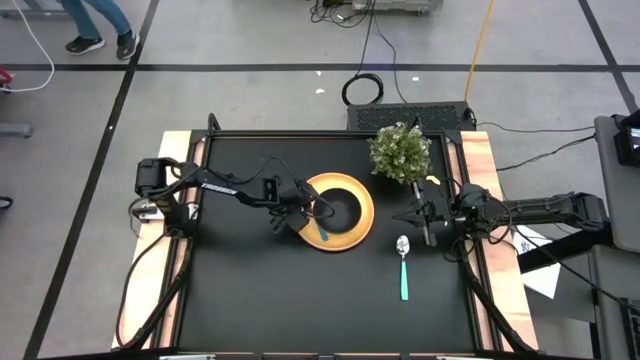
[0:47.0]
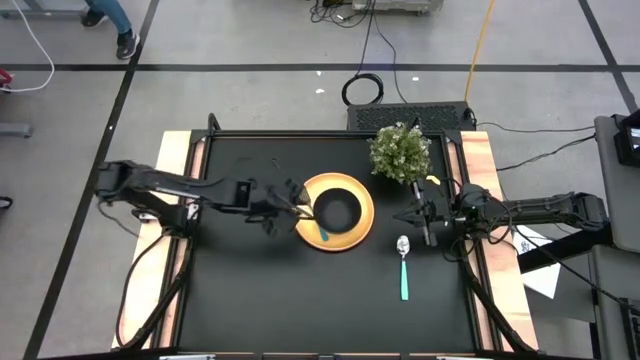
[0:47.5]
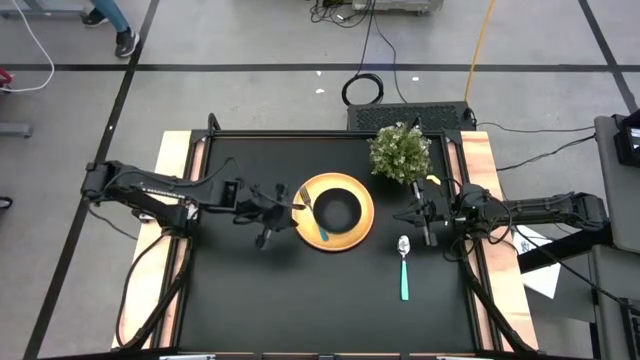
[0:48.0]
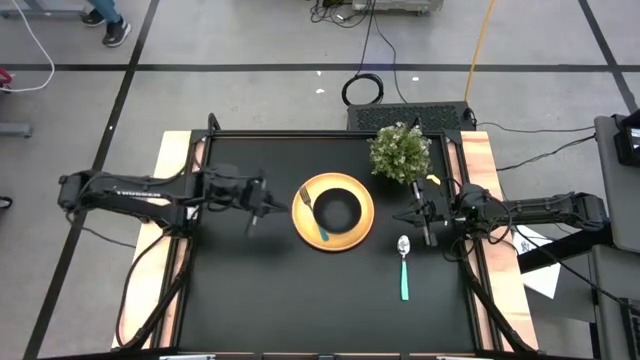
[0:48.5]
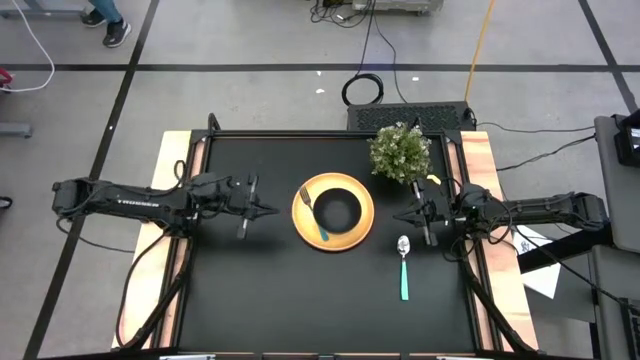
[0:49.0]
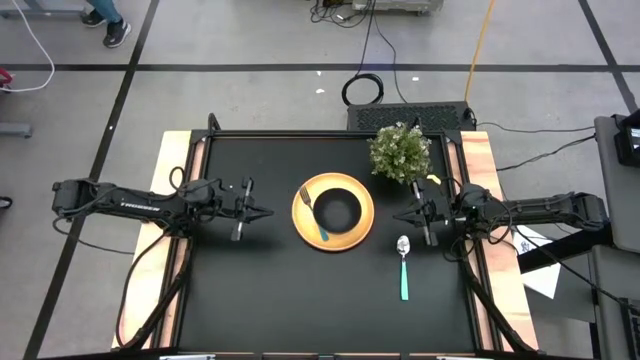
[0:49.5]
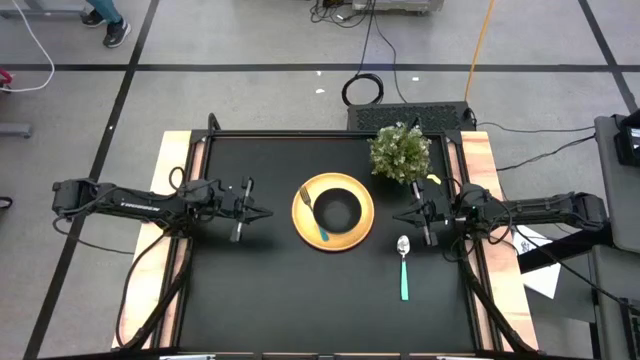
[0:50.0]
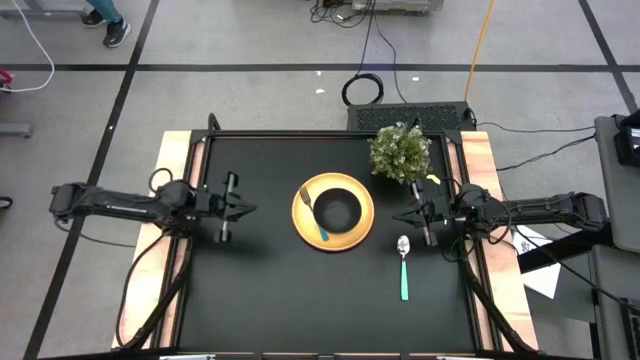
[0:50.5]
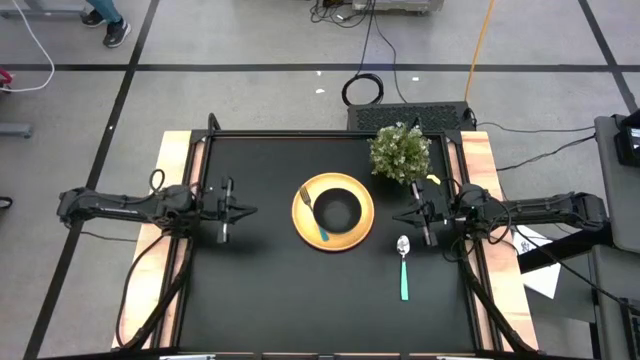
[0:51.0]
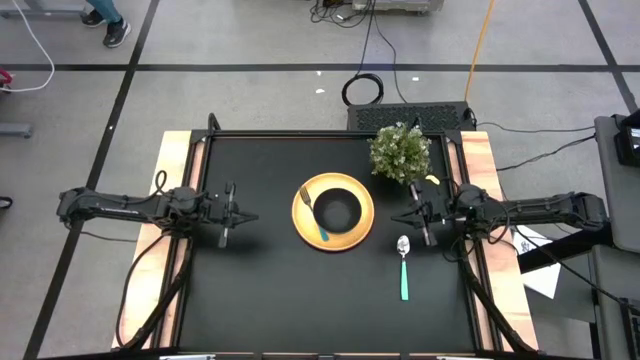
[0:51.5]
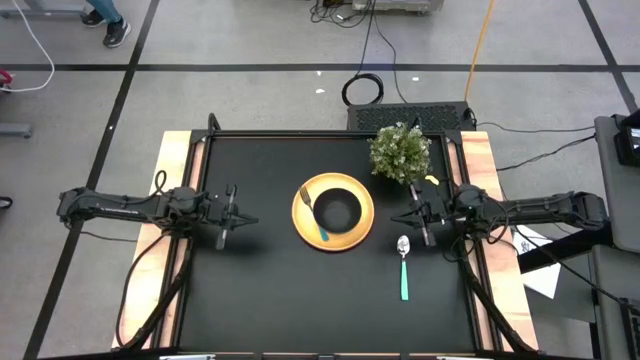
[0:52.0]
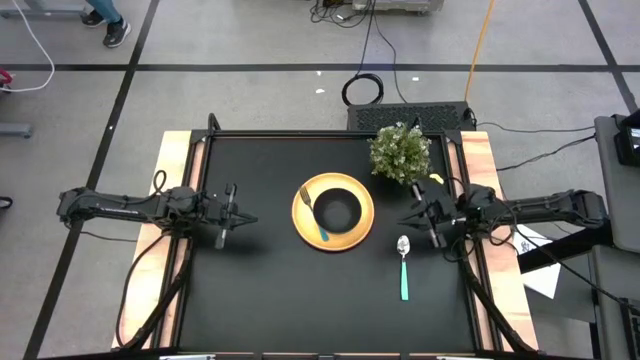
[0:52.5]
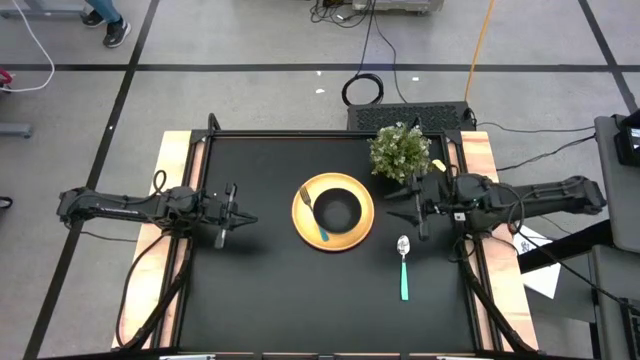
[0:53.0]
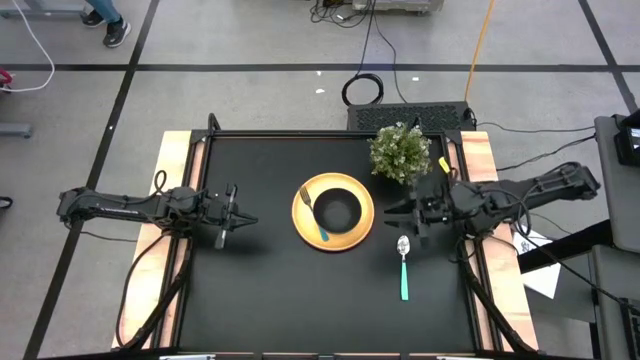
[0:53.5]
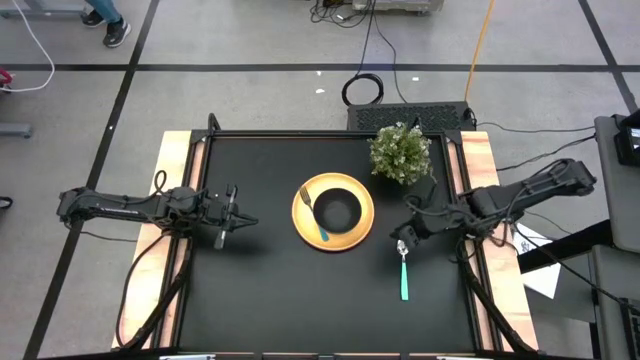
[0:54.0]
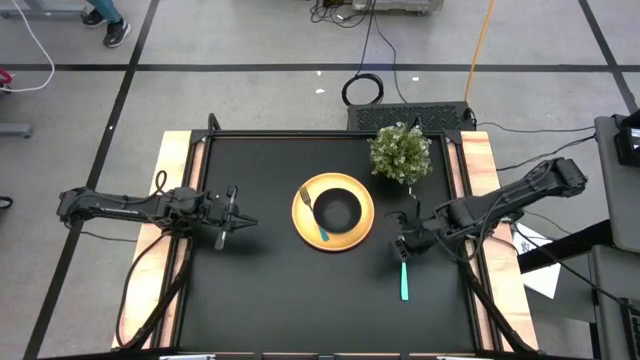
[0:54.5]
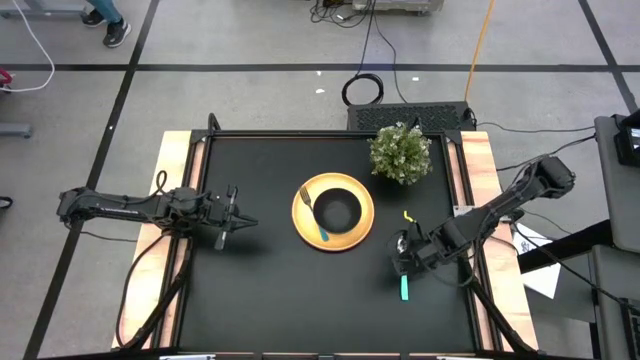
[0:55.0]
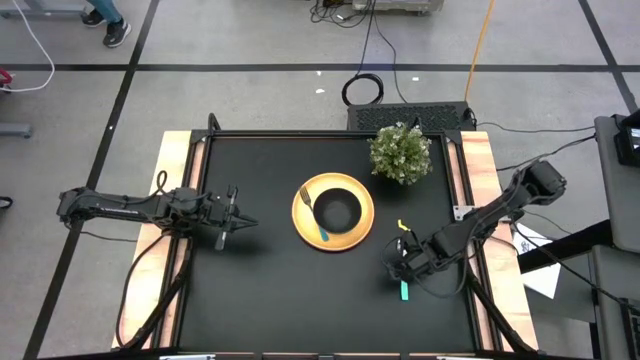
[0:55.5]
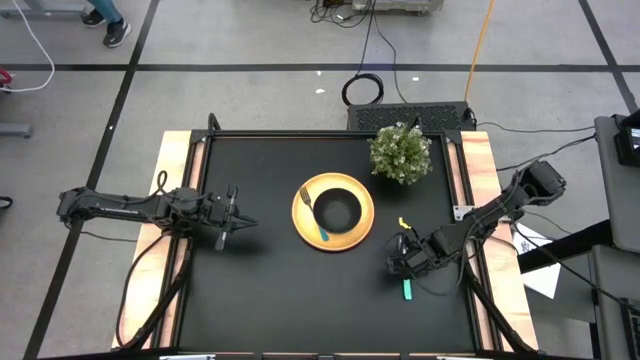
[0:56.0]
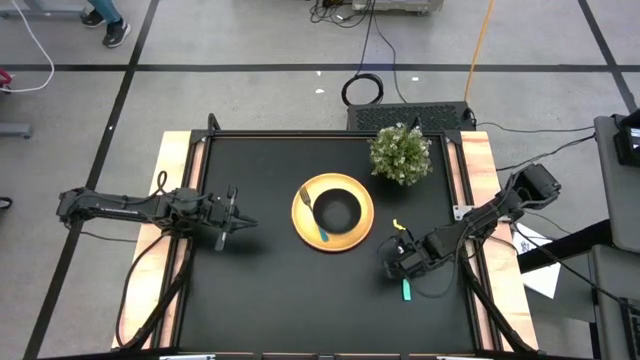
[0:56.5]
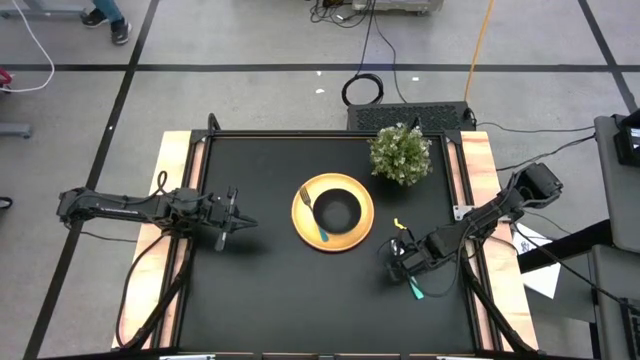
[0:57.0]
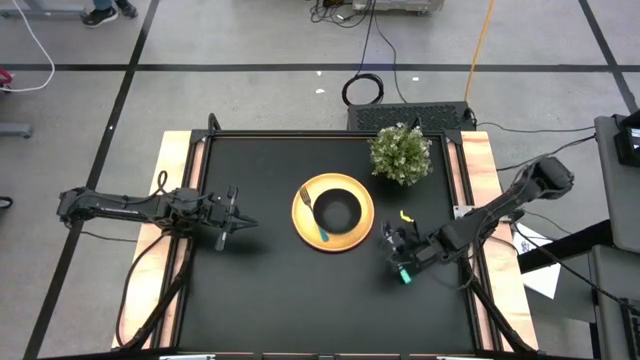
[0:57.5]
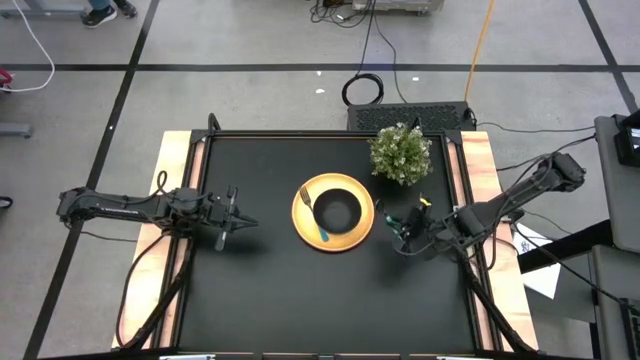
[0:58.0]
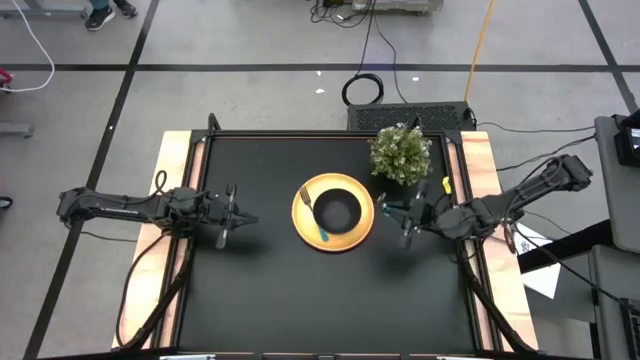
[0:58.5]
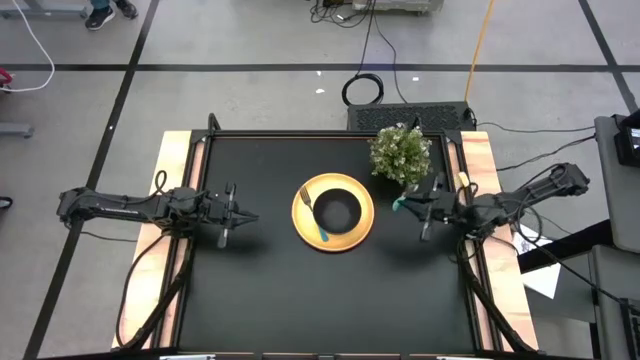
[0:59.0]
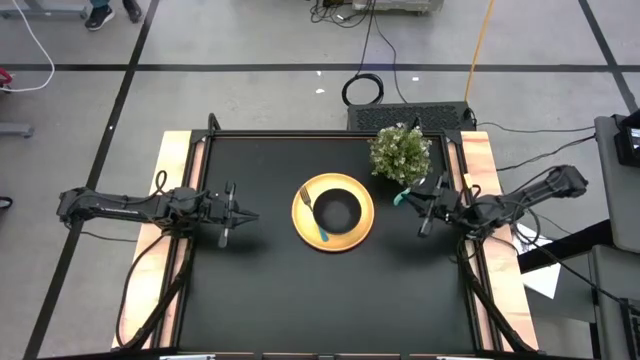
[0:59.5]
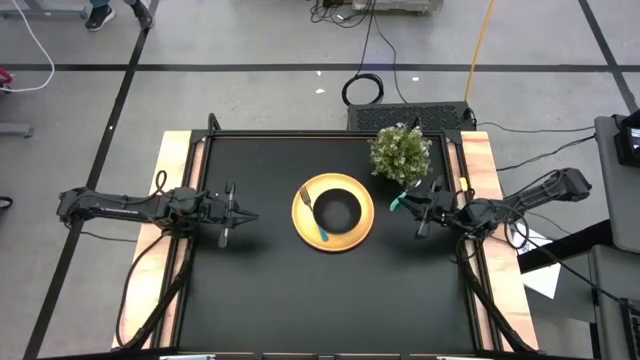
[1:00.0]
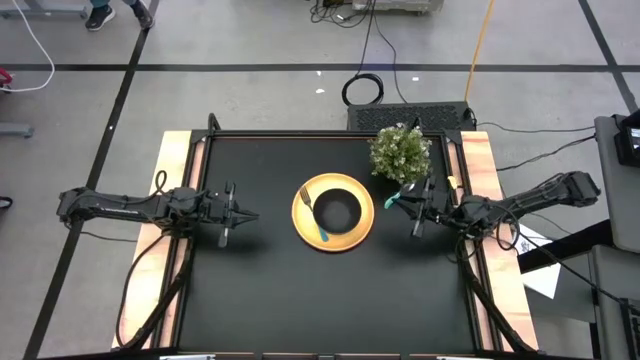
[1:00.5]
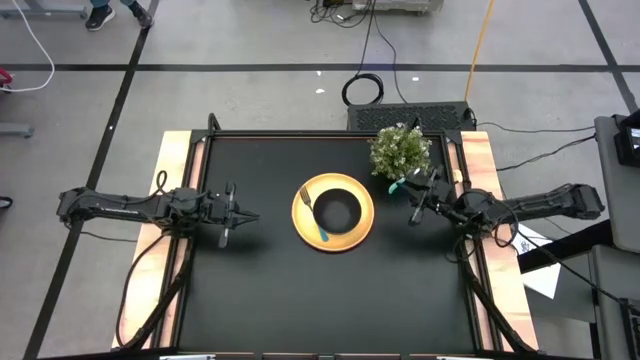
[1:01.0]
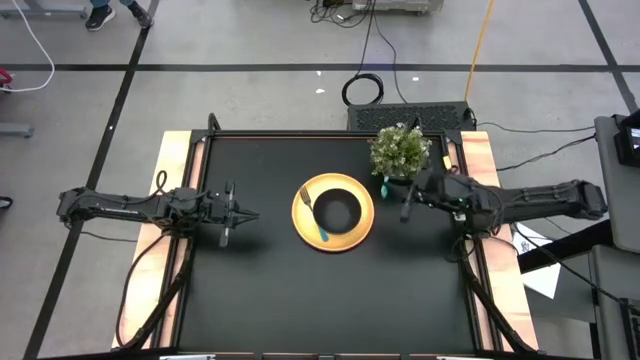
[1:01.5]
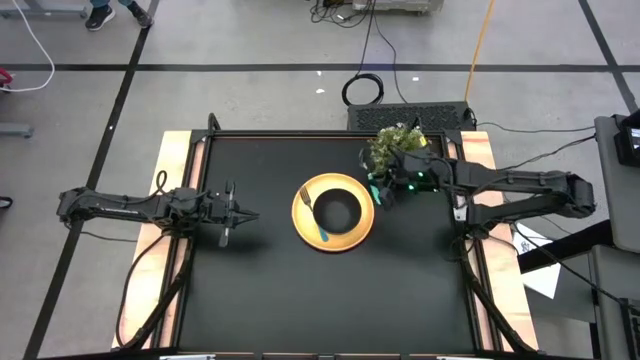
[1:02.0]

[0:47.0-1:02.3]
Task: Set table place
Put the blue spoon into the black bowl

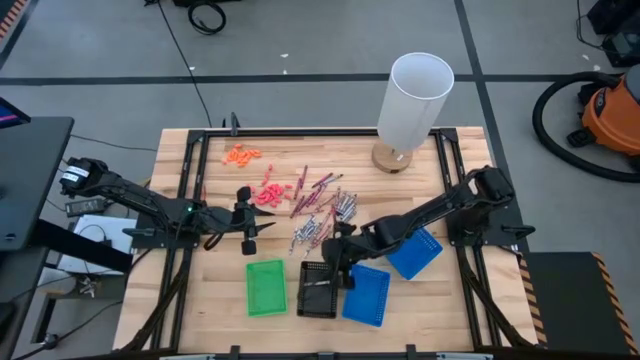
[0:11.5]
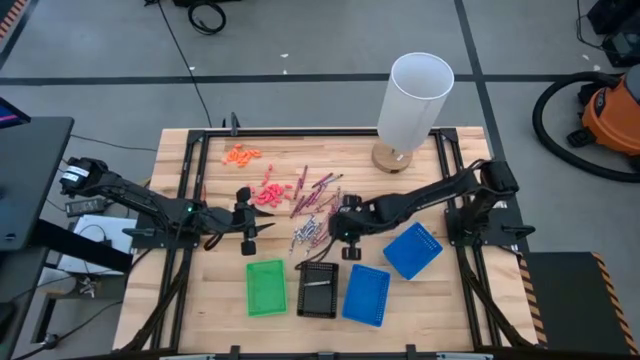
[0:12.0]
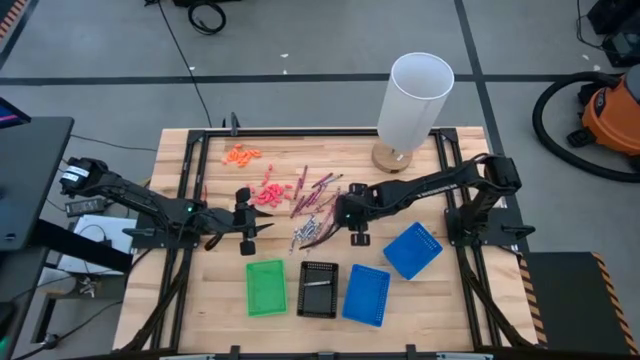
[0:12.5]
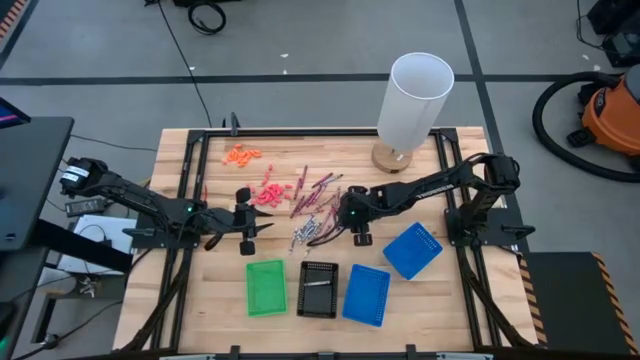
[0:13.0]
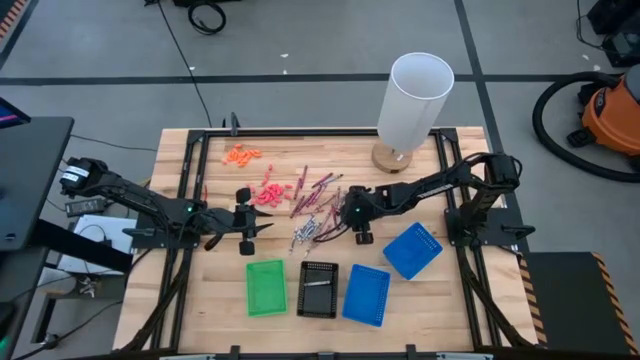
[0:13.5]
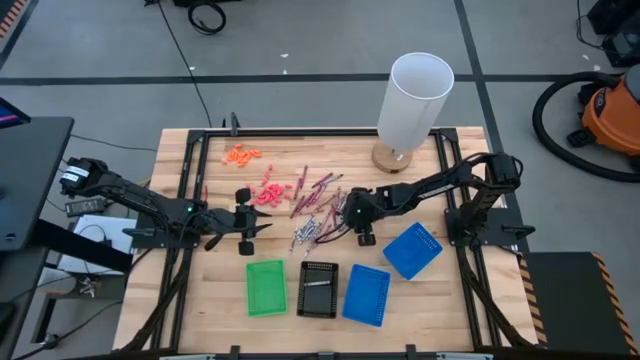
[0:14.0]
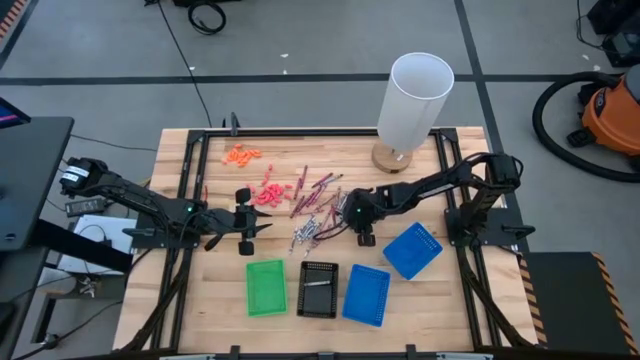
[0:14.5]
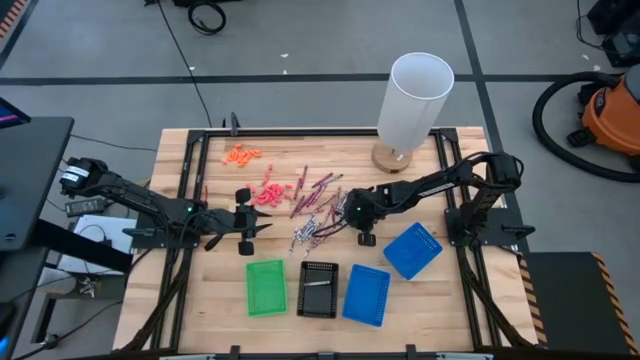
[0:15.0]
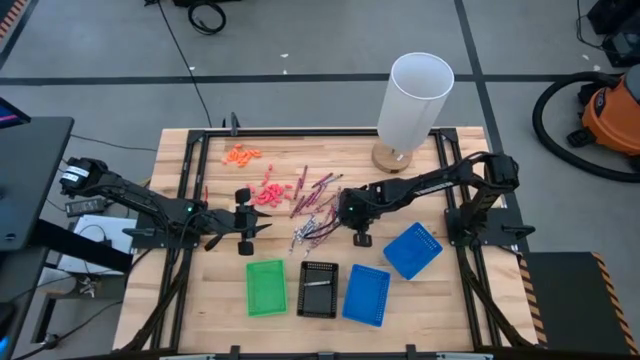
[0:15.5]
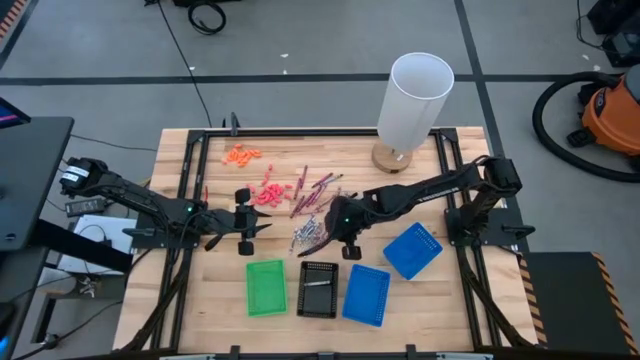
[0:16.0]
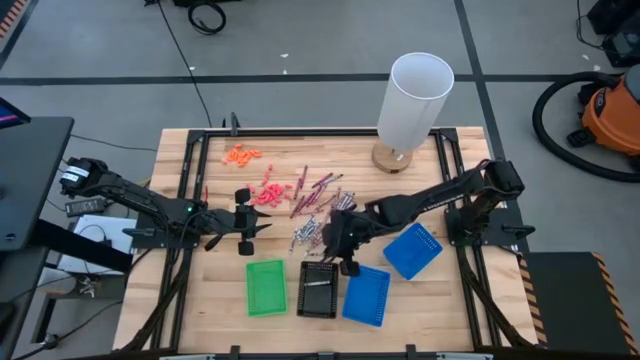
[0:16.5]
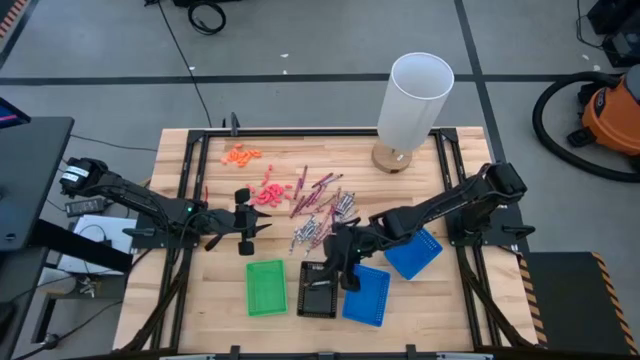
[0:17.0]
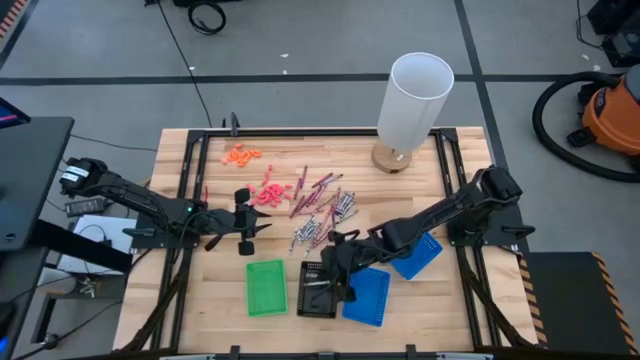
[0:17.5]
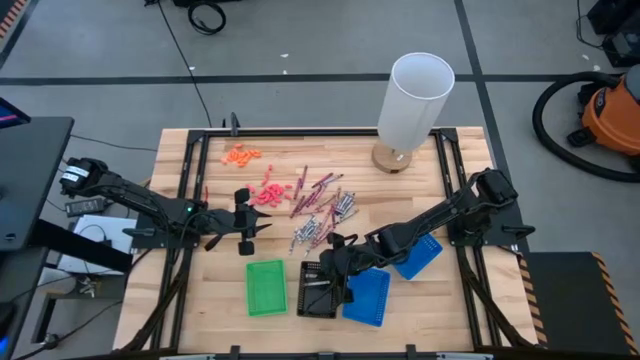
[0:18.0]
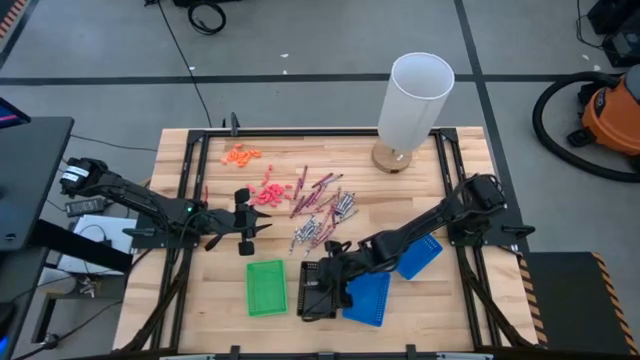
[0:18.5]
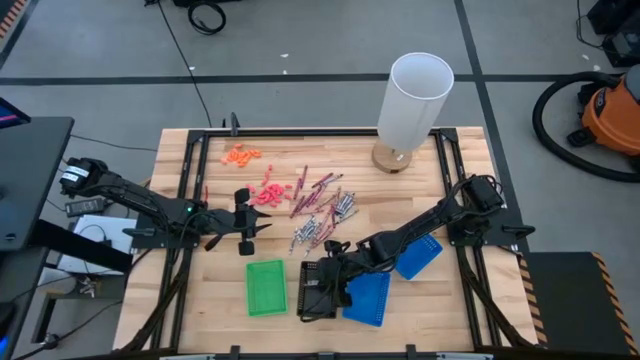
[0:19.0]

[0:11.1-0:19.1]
Task: Sort crayons
Put the black crayon into the black basket
